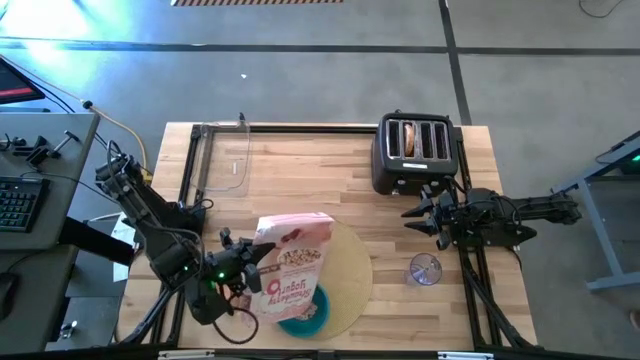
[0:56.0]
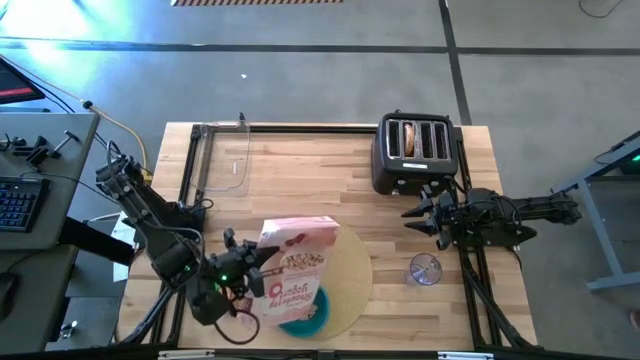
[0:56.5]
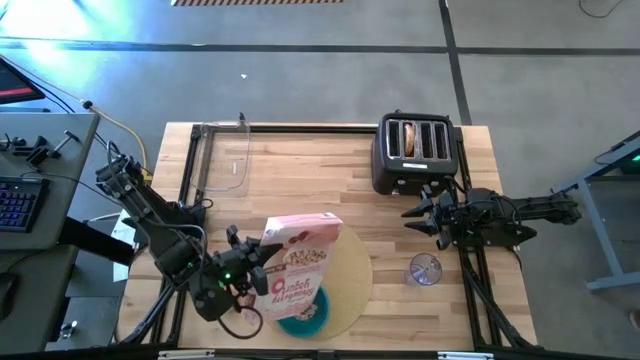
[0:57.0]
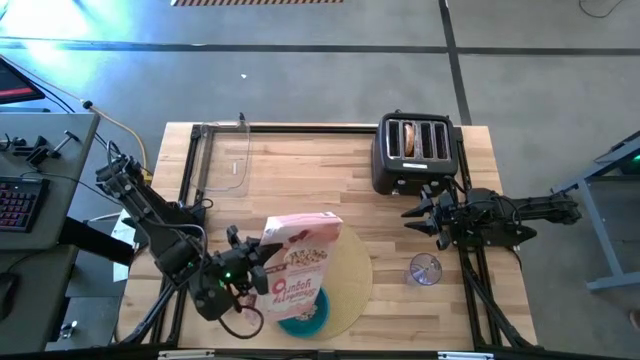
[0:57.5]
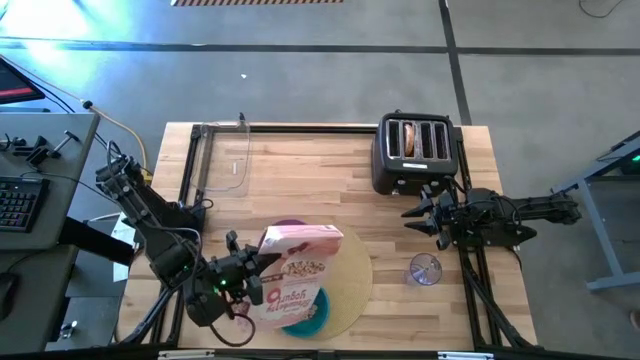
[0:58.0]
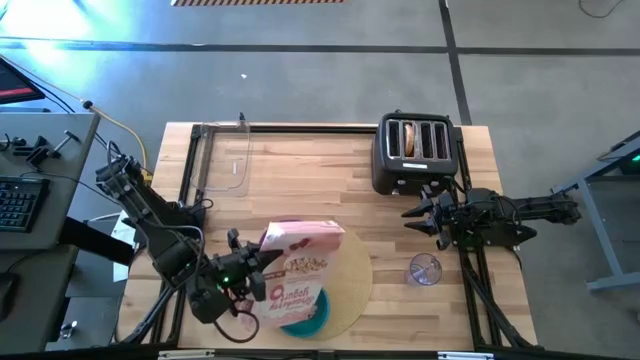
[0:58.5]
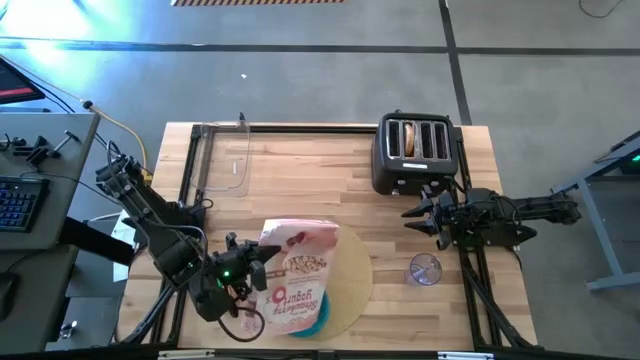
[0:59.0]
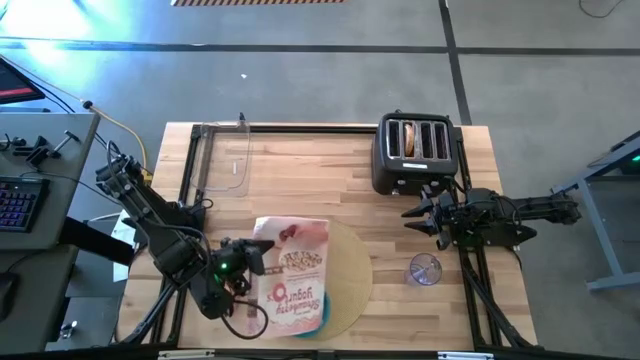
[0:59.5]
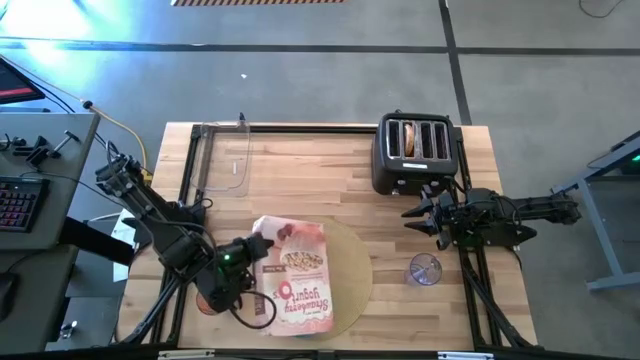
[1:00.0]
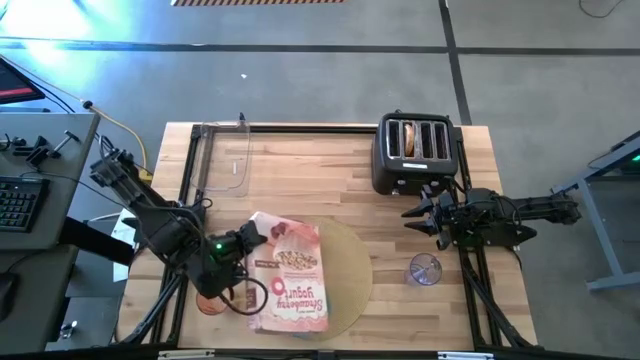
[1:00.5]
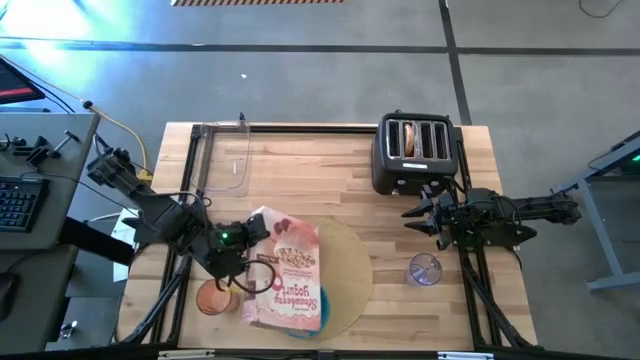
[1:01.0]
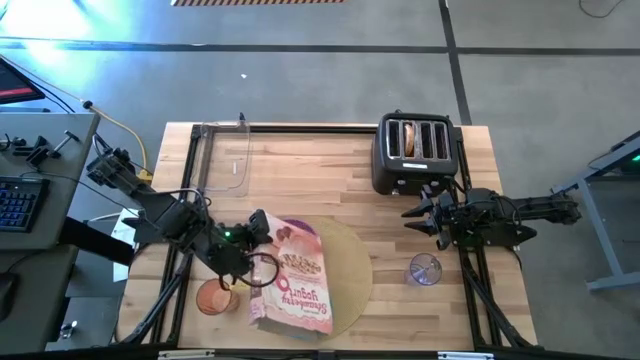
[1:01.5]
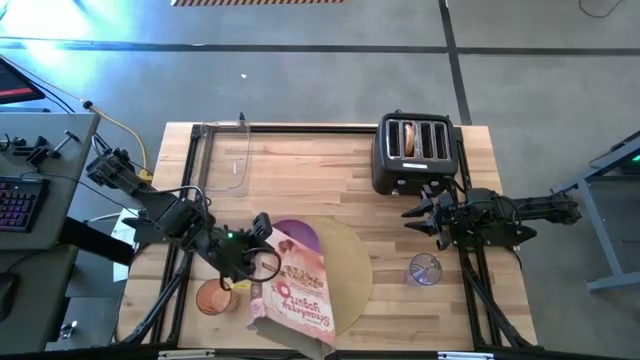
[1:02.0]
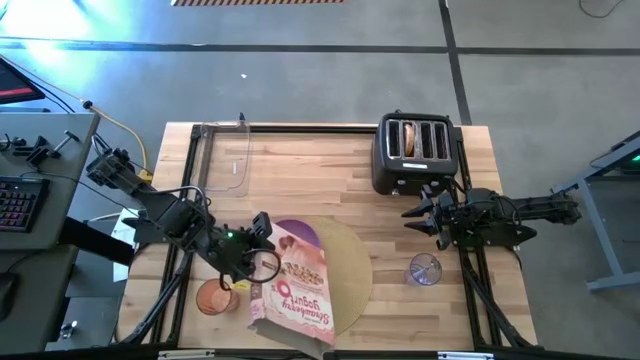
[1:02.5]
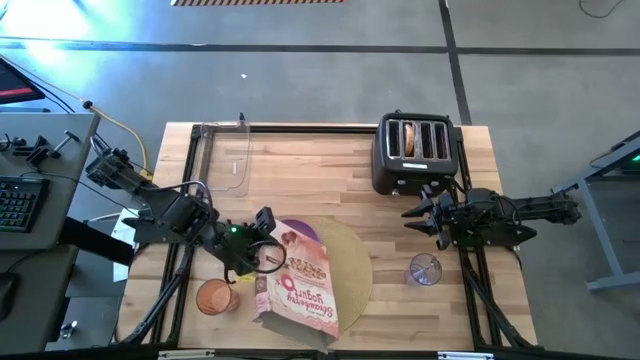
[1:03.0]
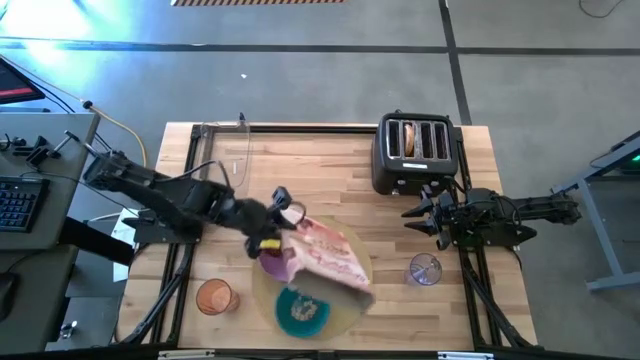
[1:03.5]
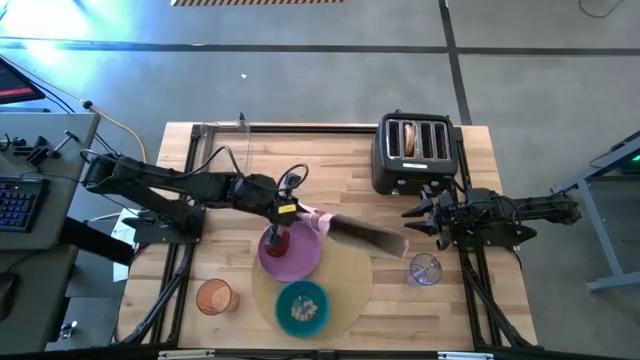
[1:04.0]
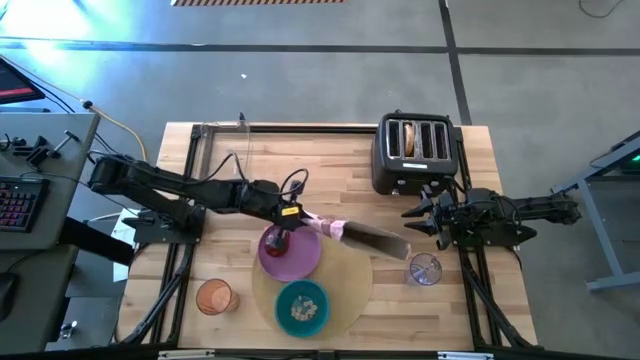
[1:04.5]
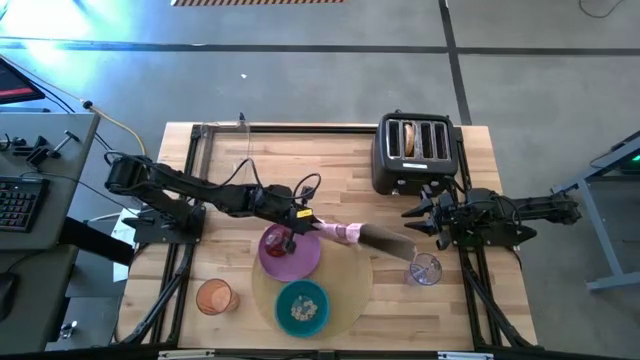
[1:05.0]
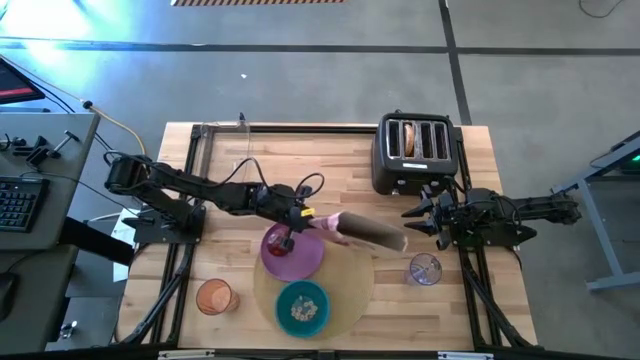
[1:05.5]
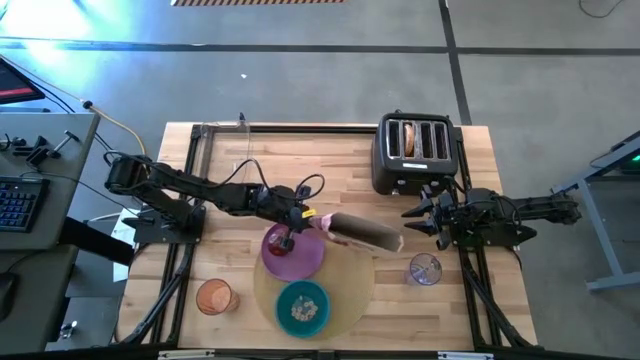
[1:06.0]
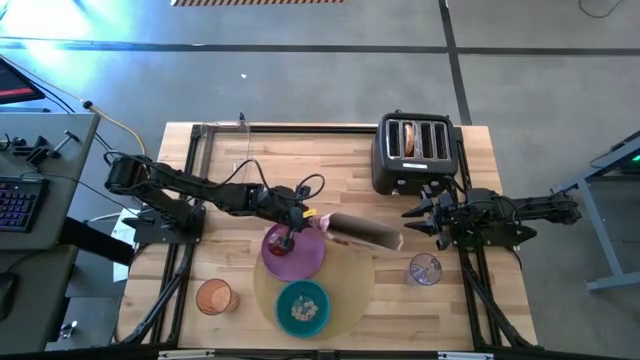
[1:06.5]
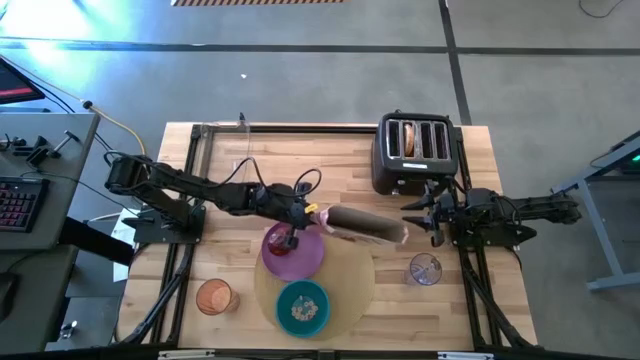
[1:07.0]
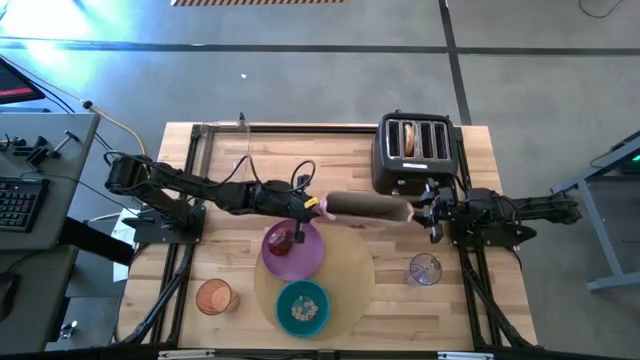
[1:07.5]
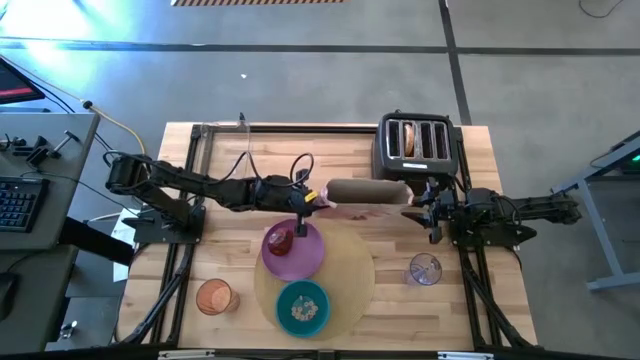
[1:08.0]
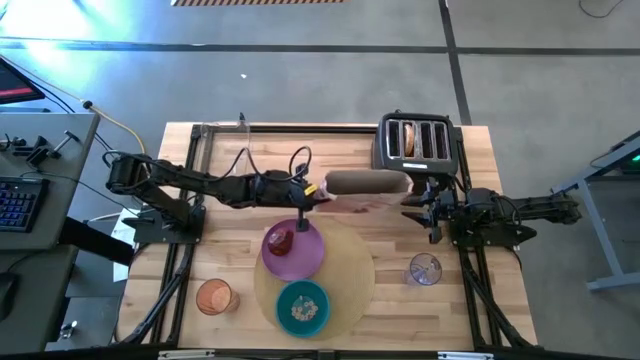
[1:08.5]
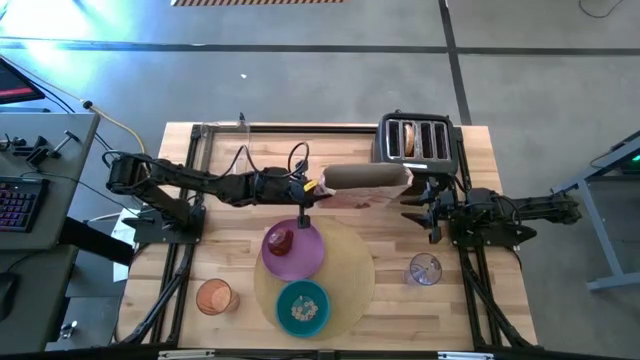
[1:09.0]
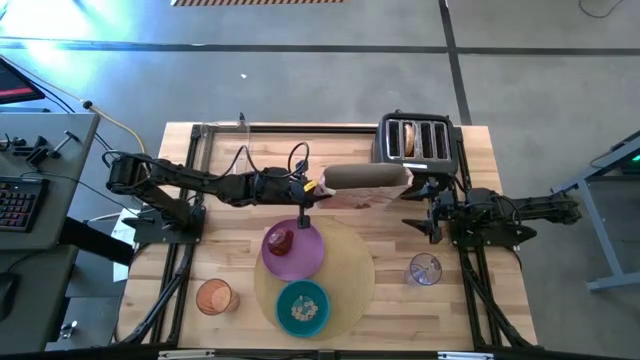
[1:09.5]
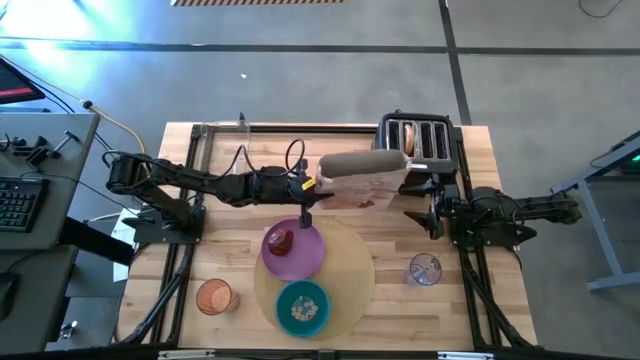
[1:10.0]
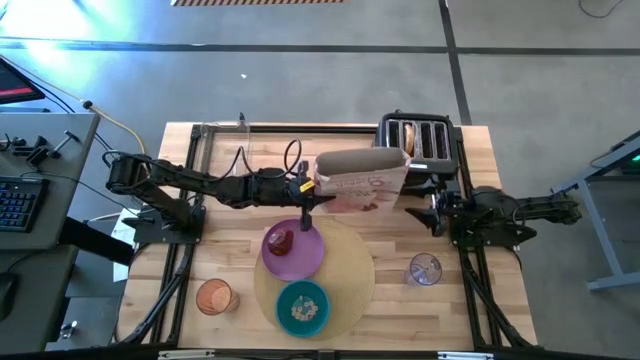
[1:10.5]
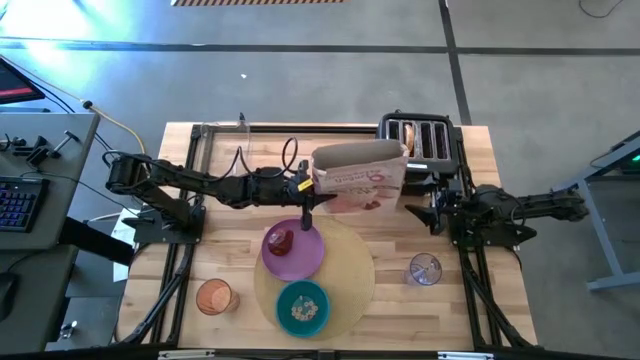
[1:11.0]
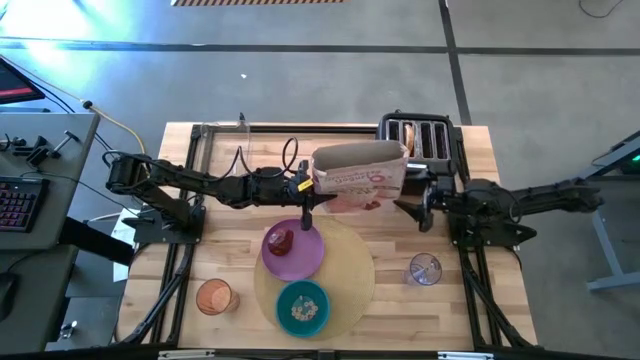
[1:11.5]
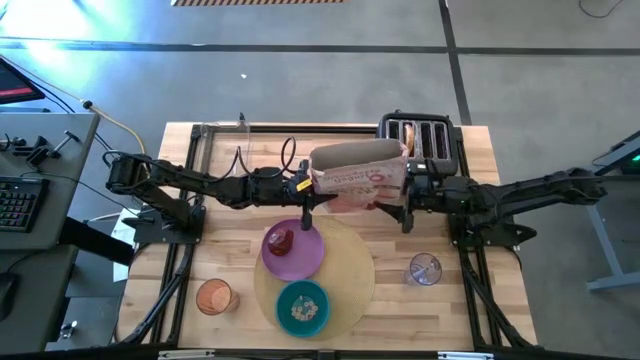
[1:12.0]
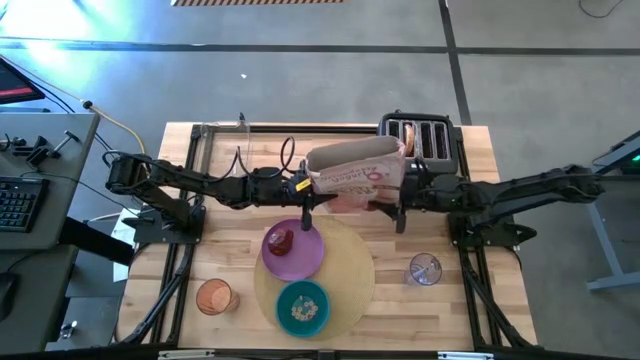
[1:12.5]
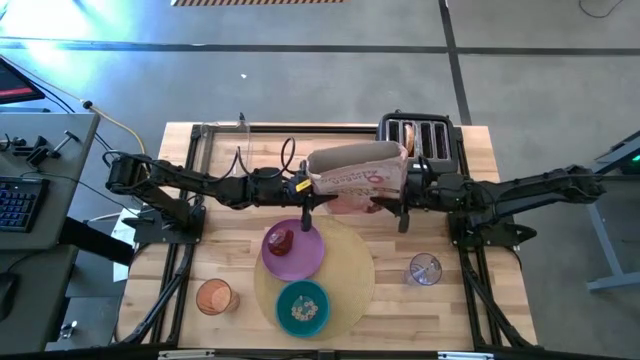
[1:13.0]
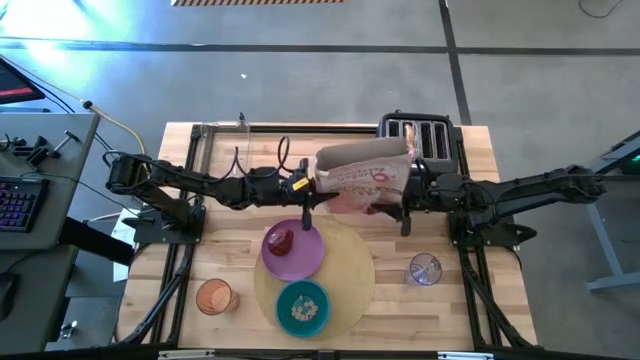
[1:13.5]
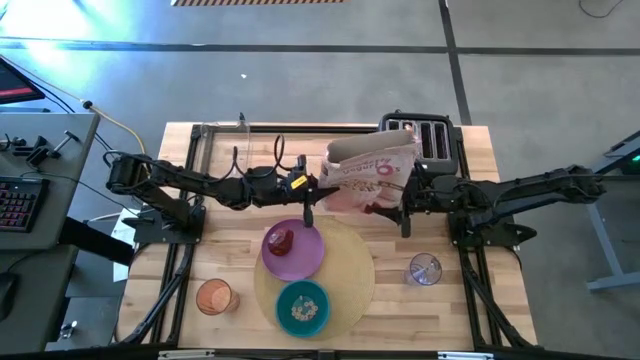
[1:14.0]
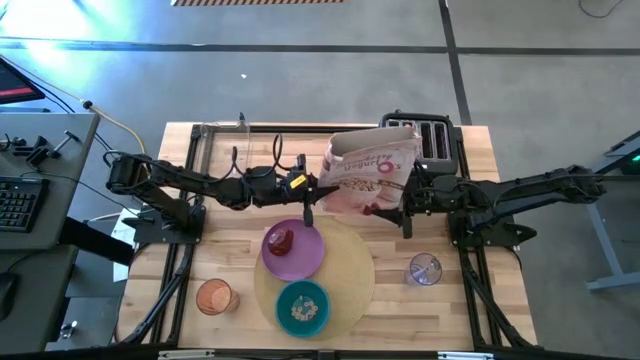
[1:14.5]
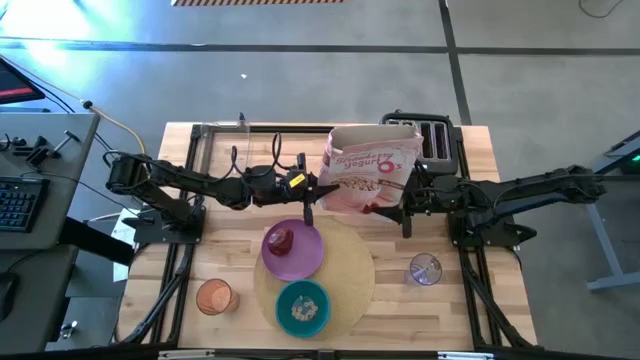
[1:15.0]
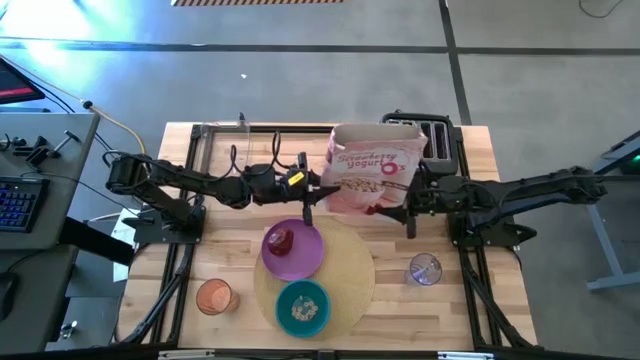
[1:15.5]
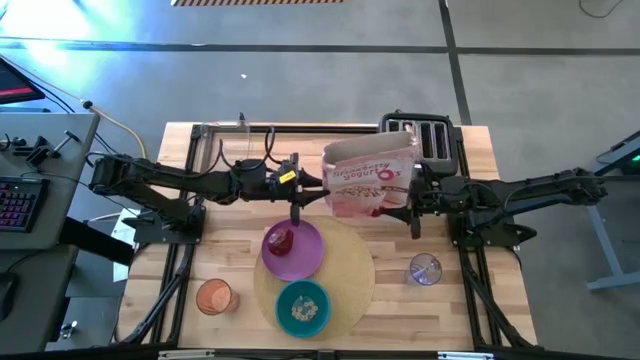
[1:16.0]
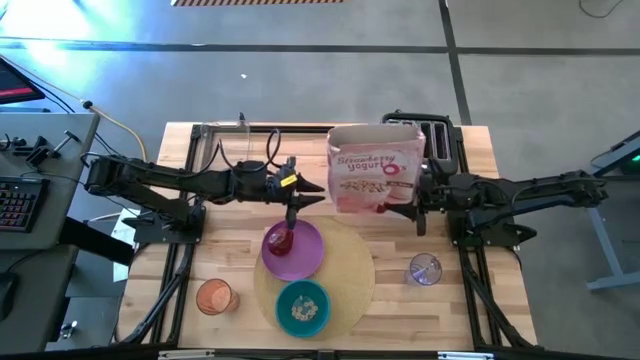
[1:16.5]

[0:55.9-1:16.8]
Task: Arrange a breakfast setting
Pour the cereal from the red cereal box into the blue bowl
